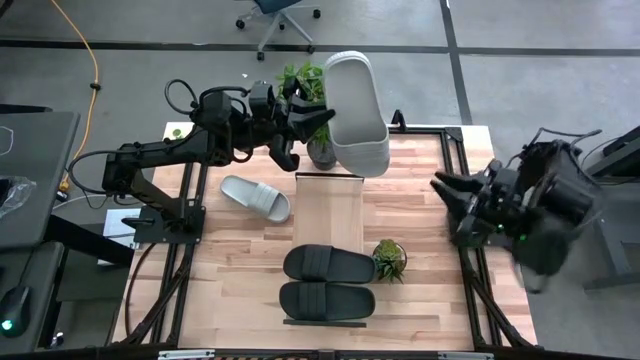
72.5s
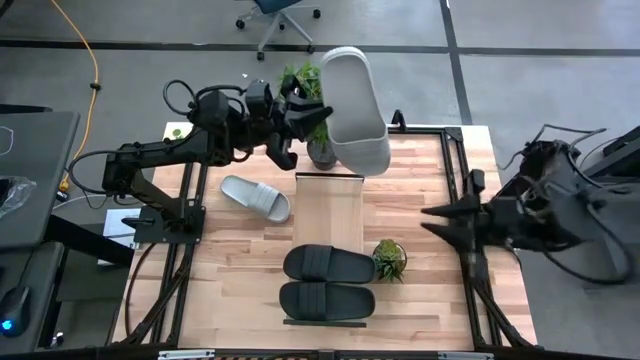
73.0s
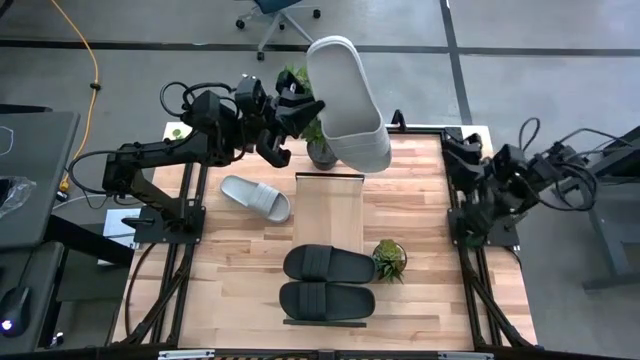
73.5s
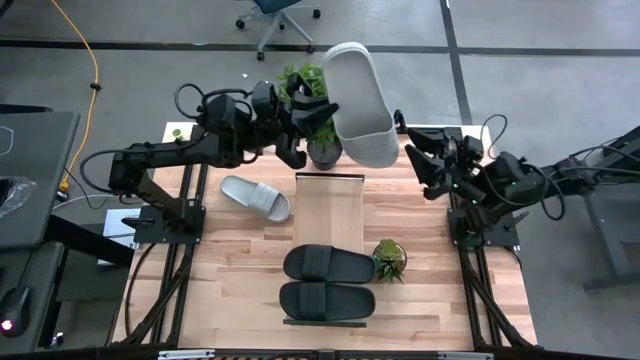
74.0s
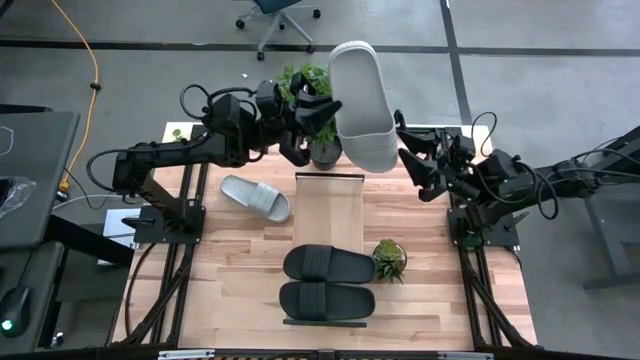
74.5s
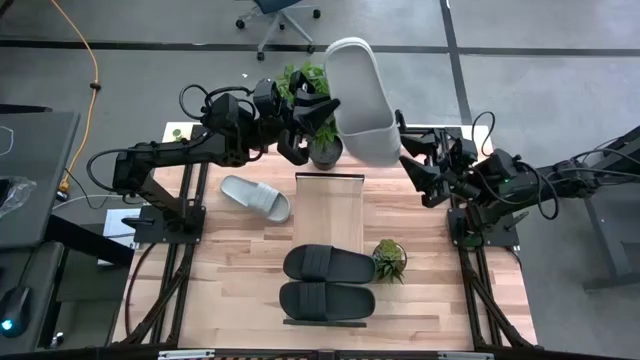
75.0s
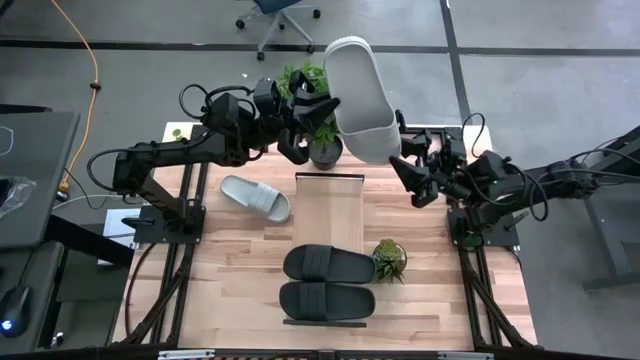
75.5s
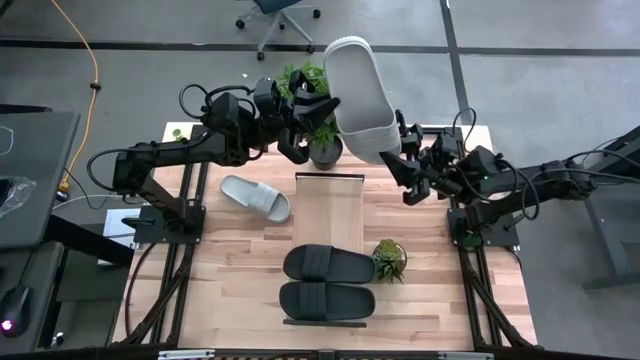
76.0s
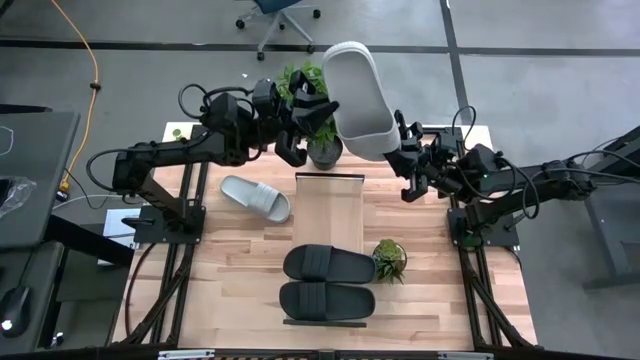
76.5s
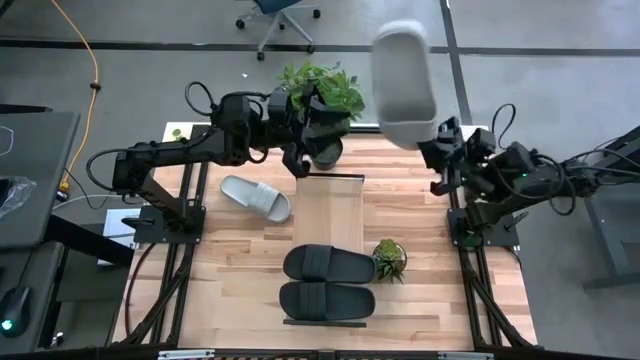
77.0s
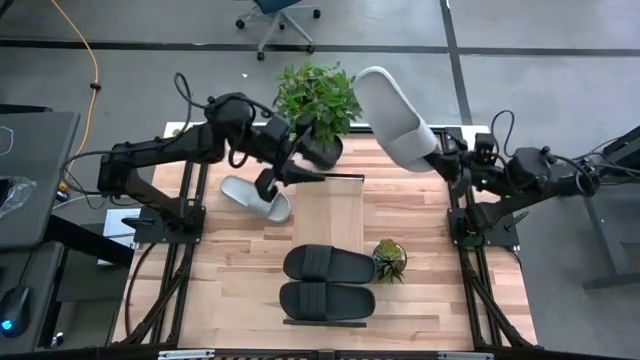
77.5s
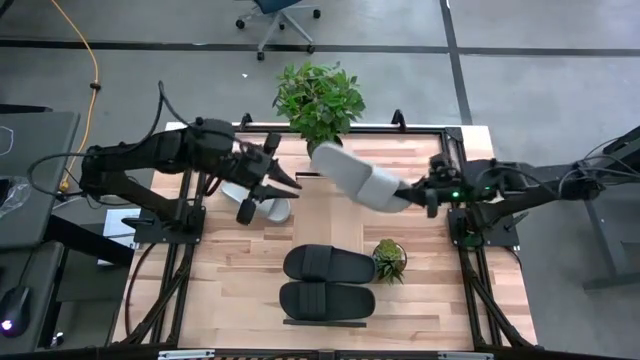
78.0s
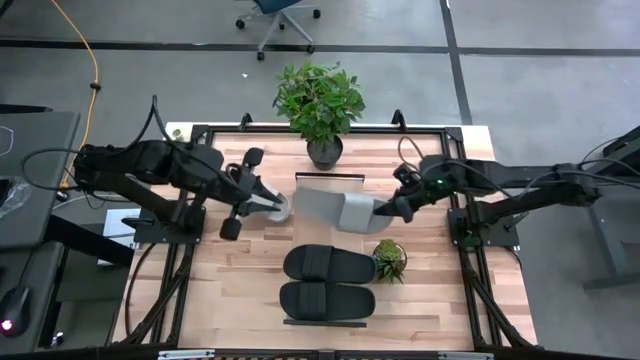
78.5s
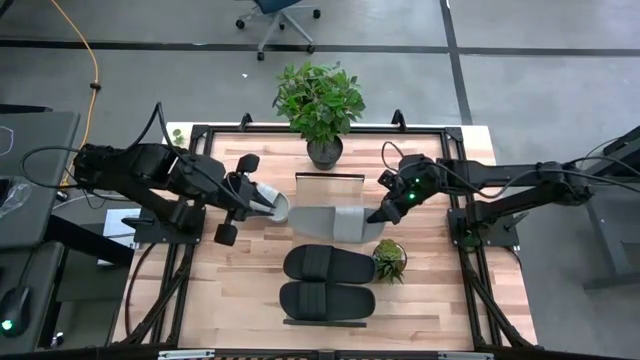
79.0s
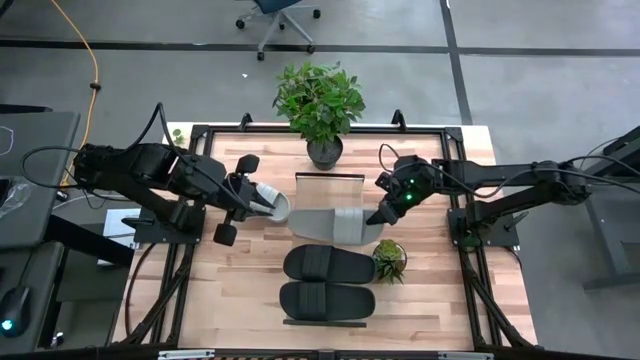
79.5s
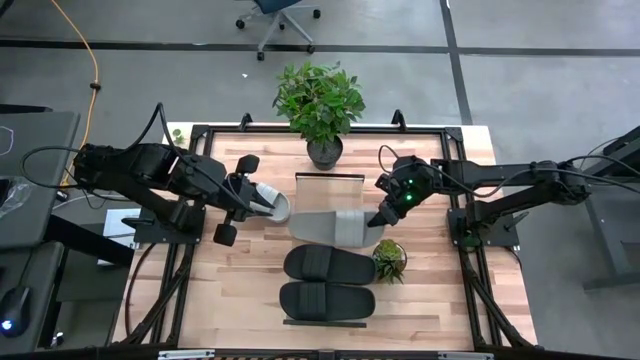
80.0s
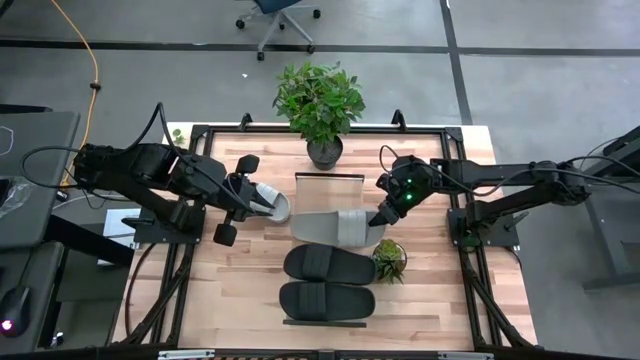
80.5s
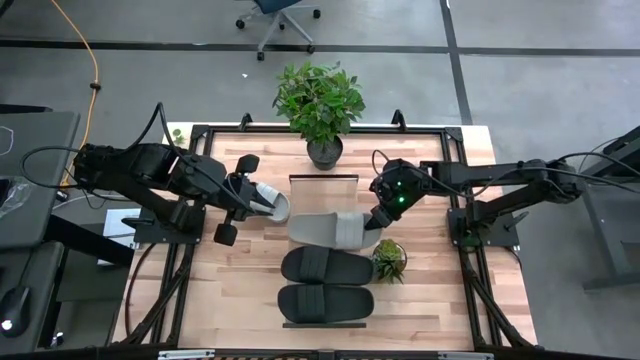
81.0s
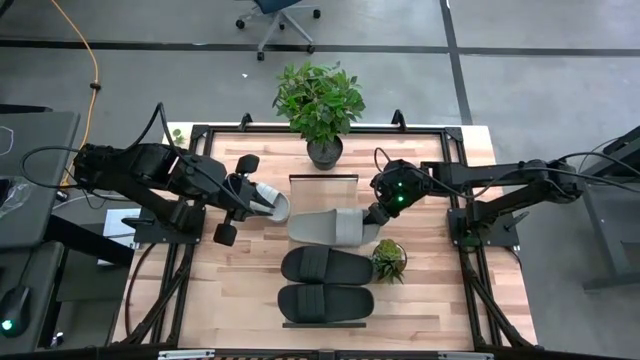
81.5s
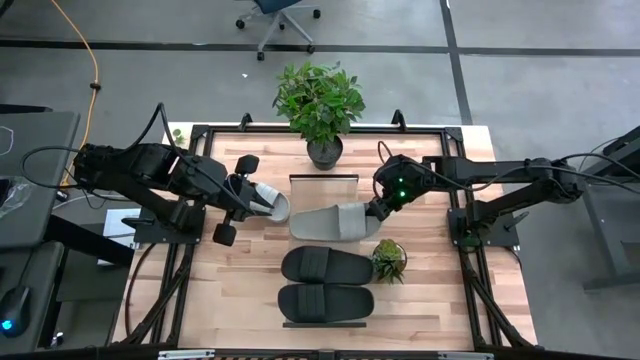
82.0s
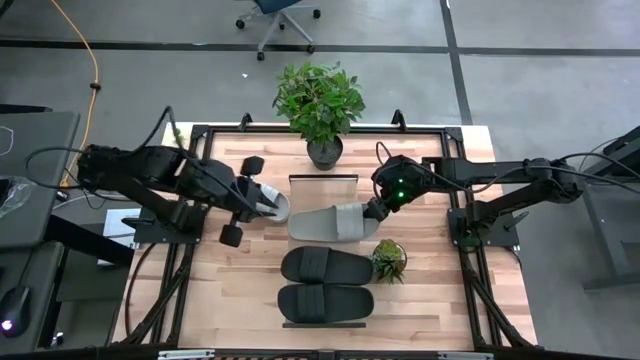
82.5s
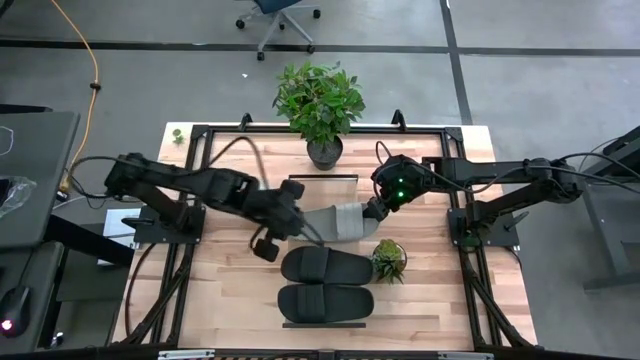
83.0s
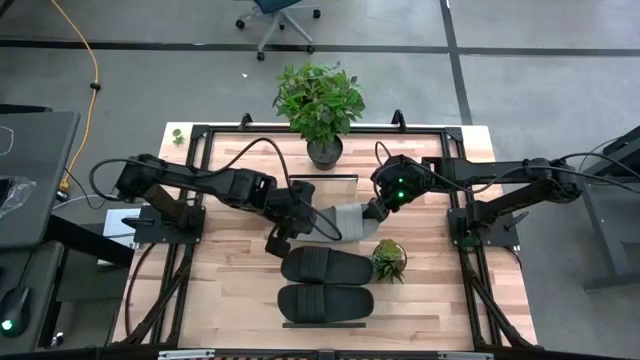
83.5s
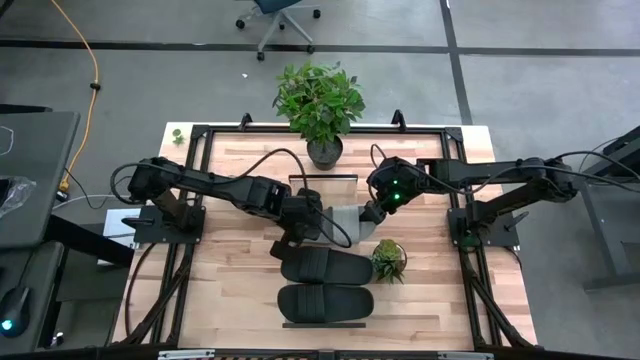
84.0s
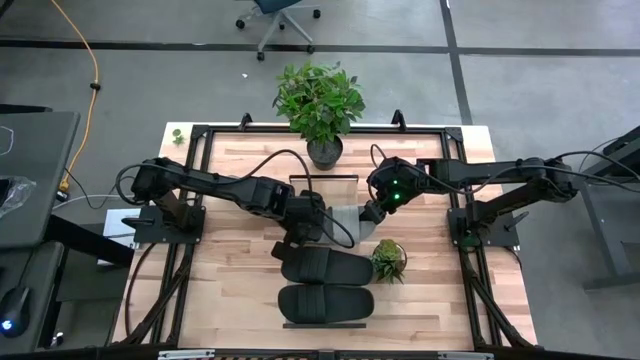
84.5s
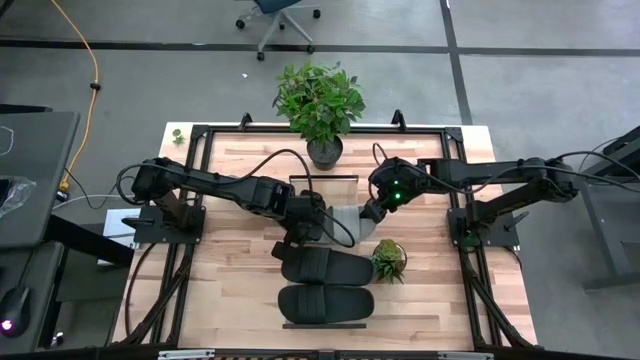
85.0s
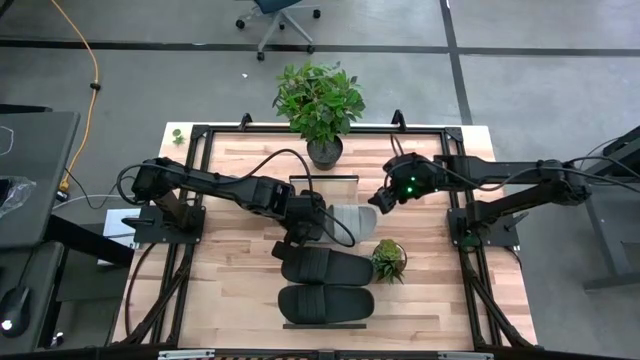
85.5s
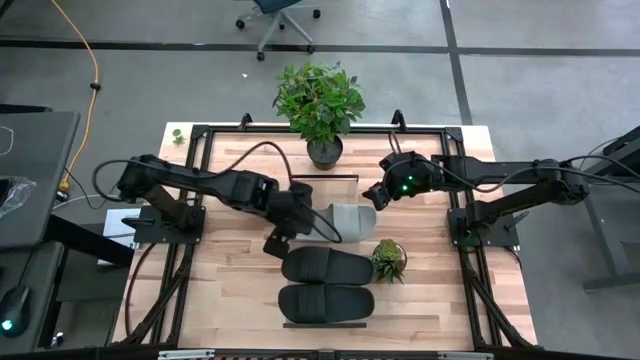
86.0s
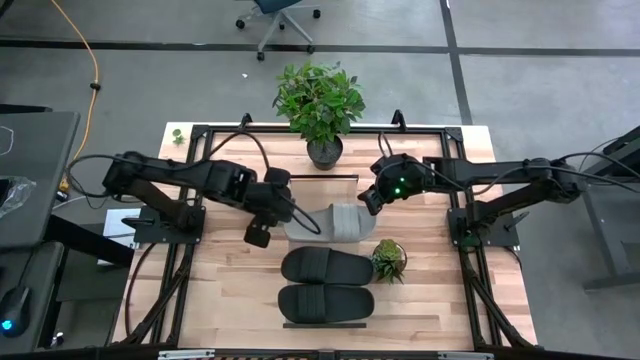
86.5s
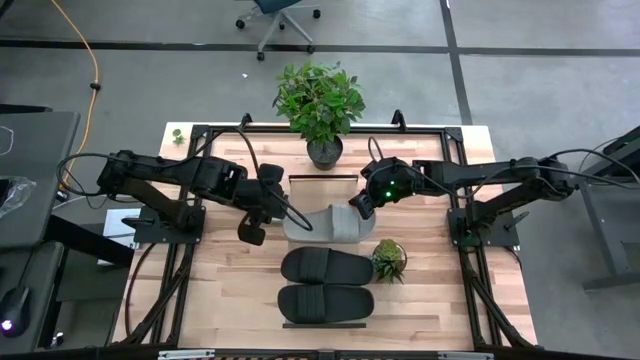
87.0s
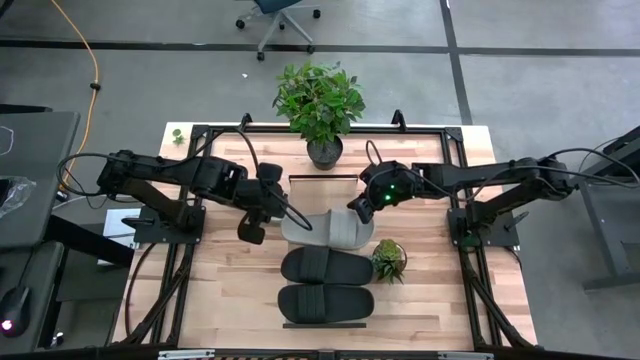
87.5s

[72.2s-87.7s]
Task: Pick and place slides into the shelf
Put the bottom gray slide into the shelf

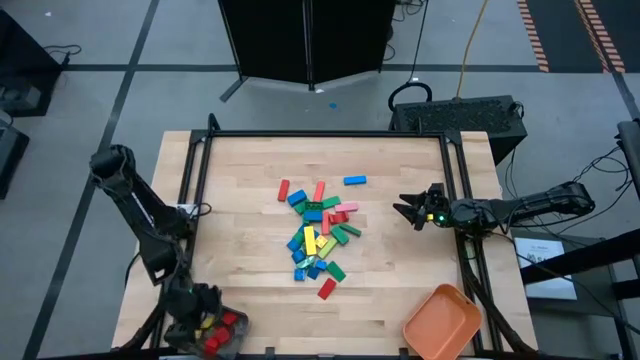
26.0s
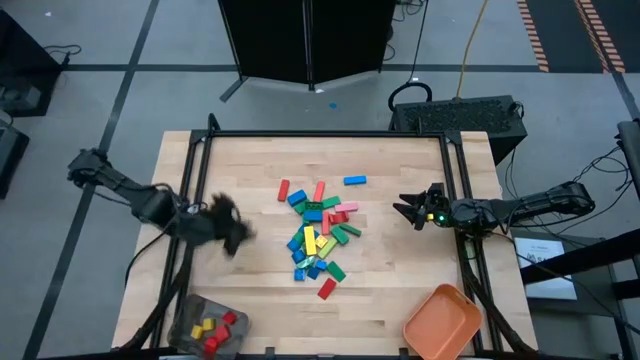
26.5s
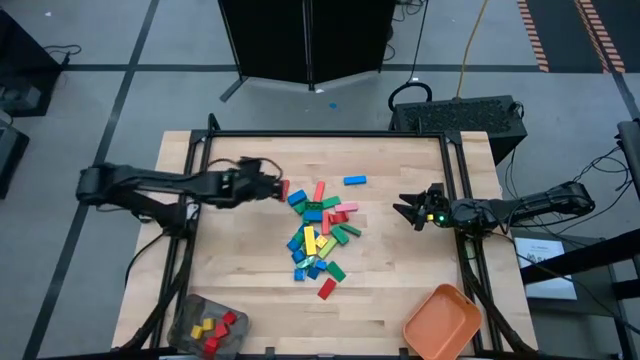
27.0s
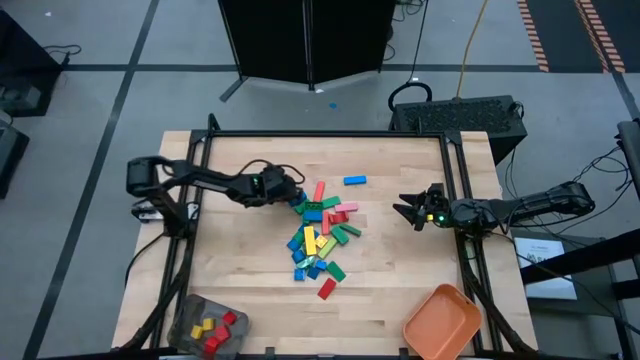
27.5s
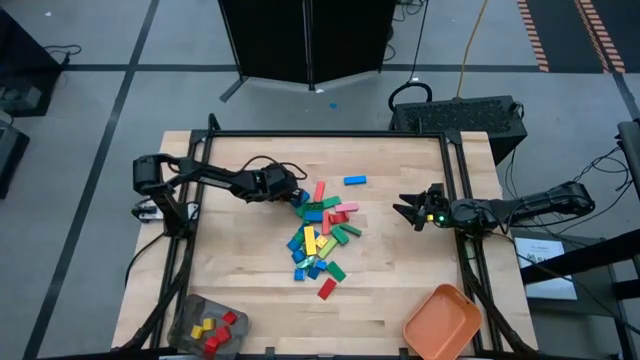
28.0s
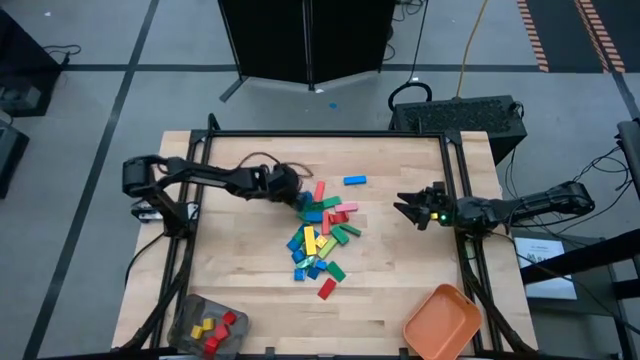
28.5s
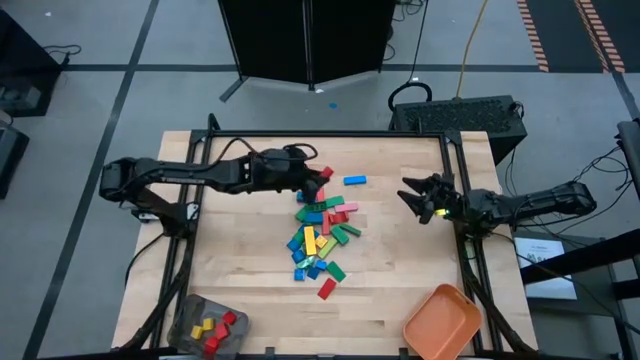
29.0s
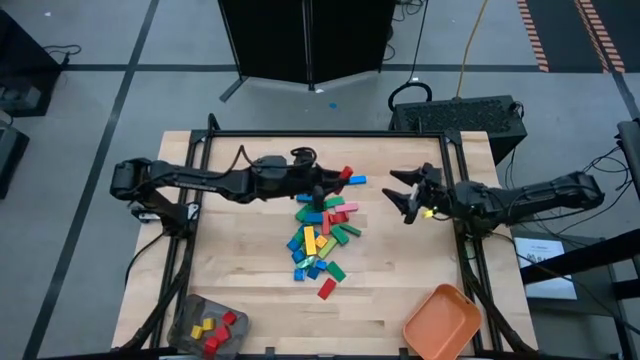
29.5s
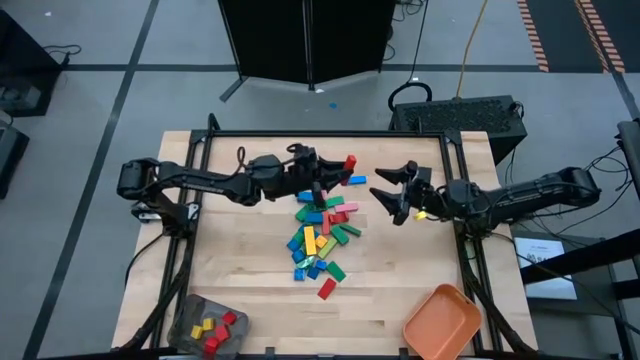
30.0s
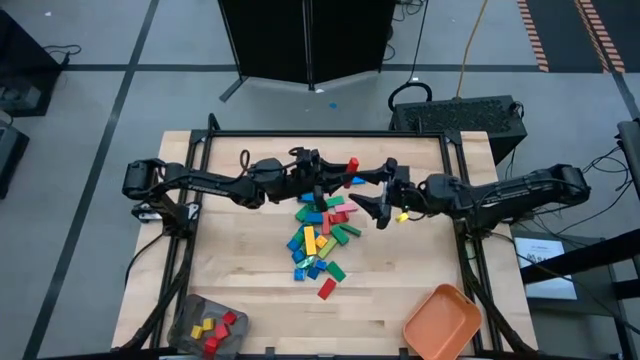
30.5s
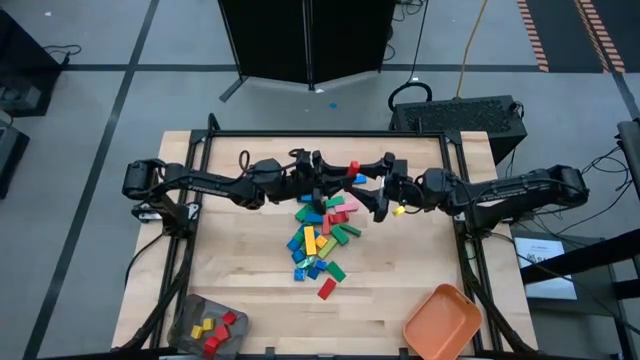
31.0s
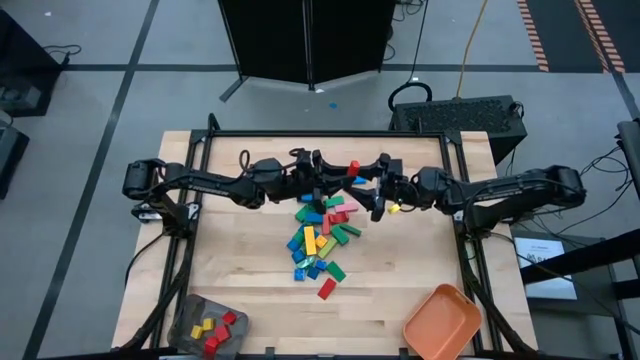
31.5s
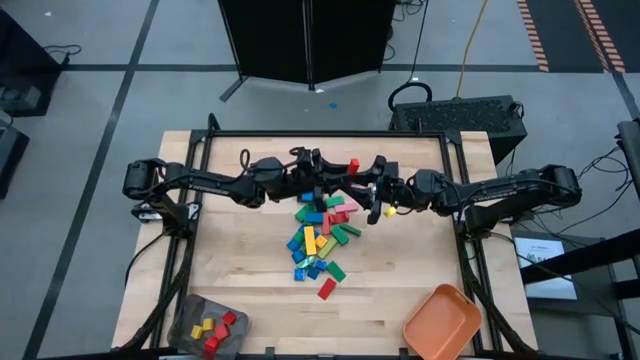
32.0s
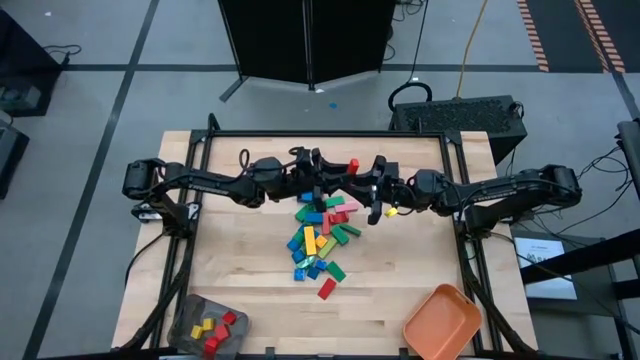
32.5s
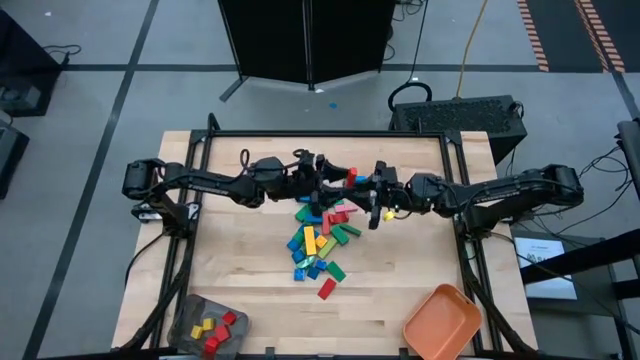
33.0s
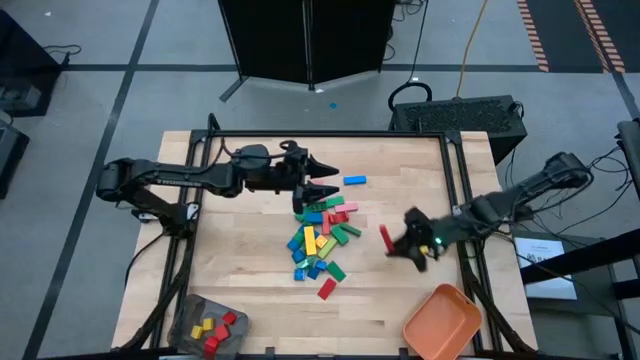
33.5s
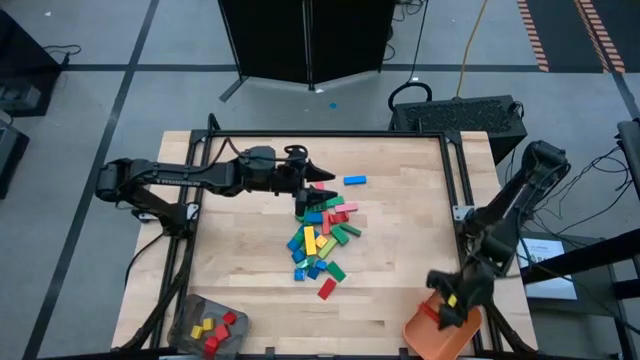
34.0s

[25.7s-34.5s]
Task: Sort blocks by size
Put the red rectangular block into the orange bin
